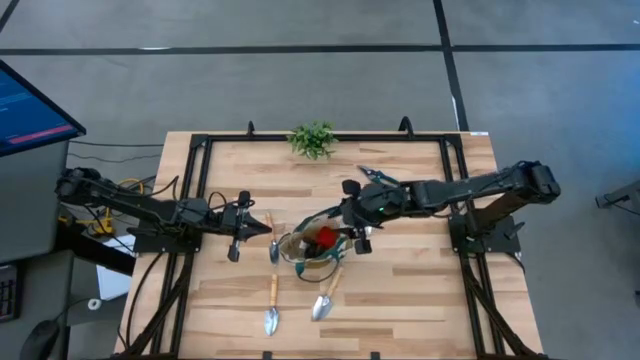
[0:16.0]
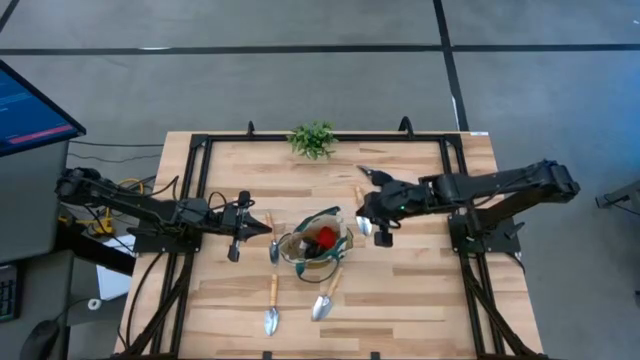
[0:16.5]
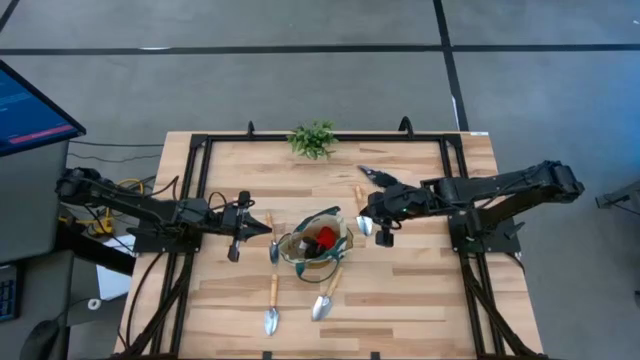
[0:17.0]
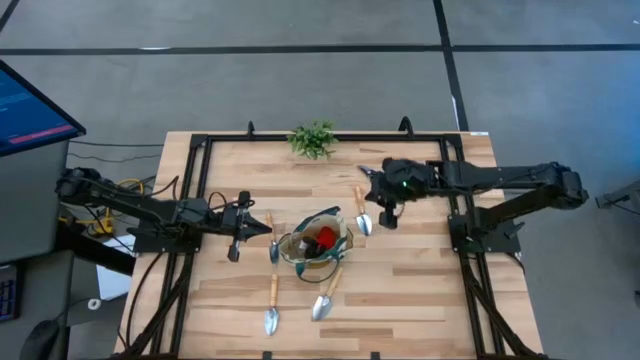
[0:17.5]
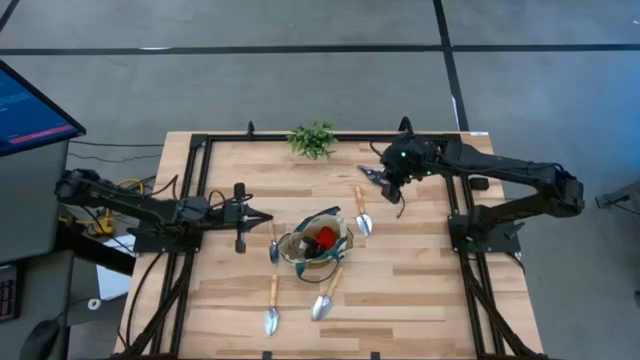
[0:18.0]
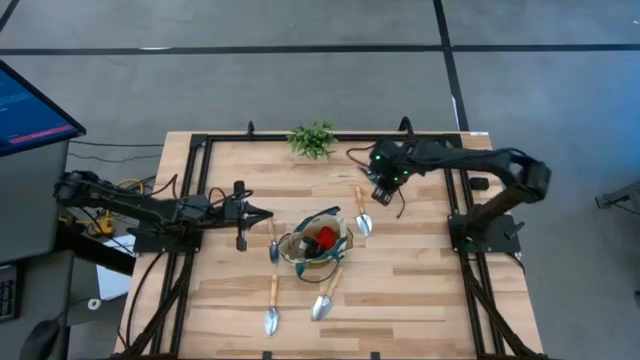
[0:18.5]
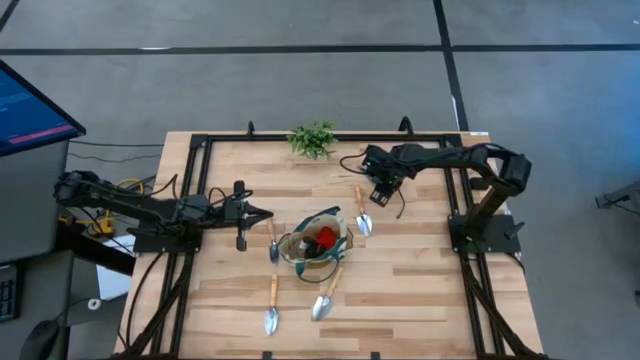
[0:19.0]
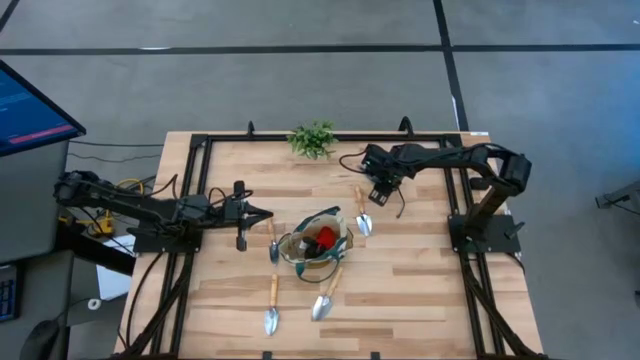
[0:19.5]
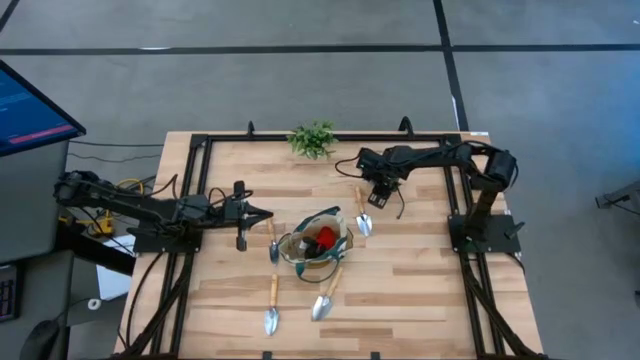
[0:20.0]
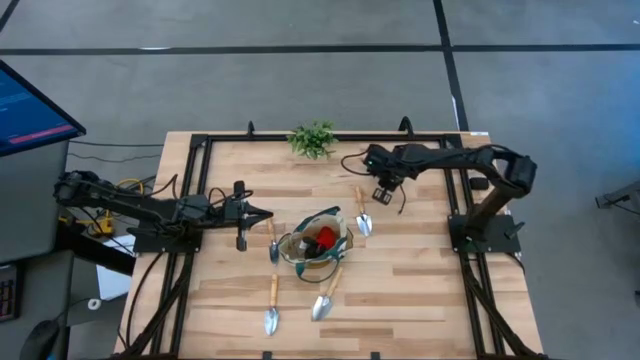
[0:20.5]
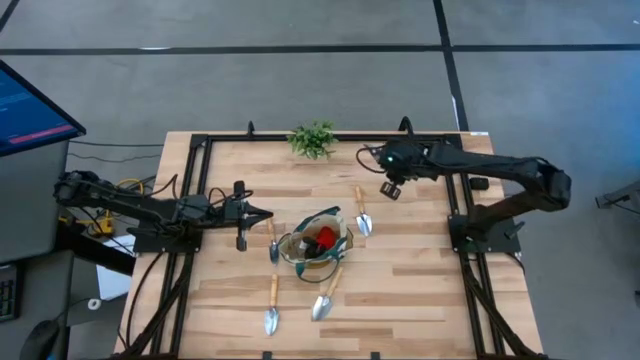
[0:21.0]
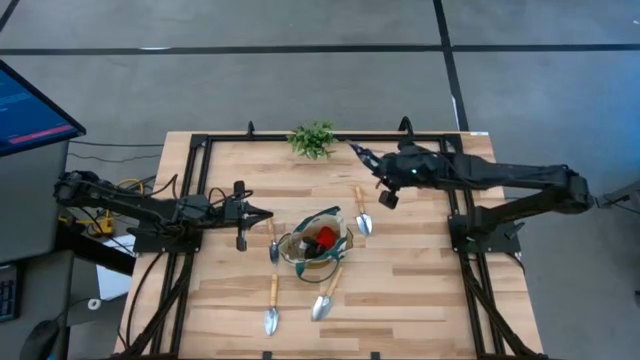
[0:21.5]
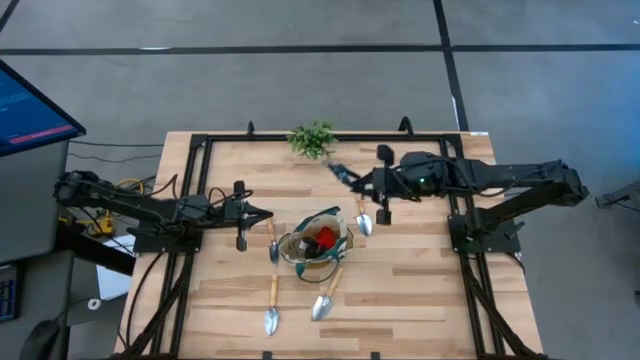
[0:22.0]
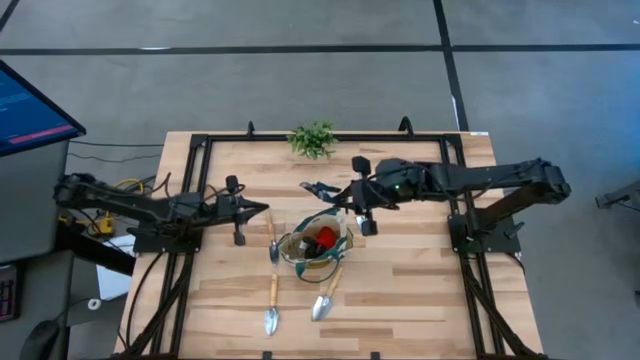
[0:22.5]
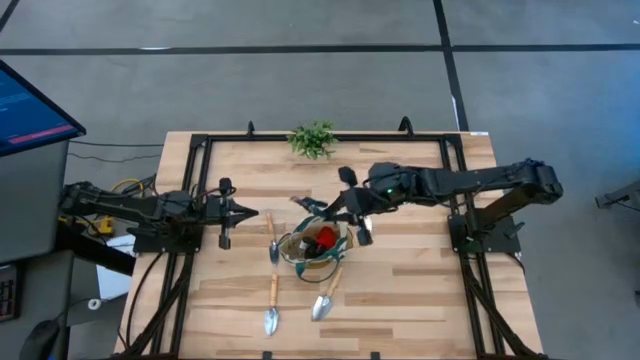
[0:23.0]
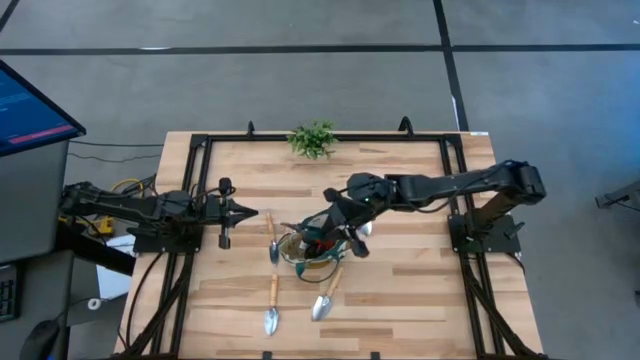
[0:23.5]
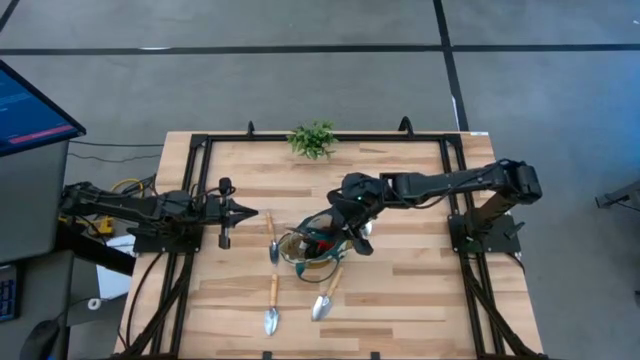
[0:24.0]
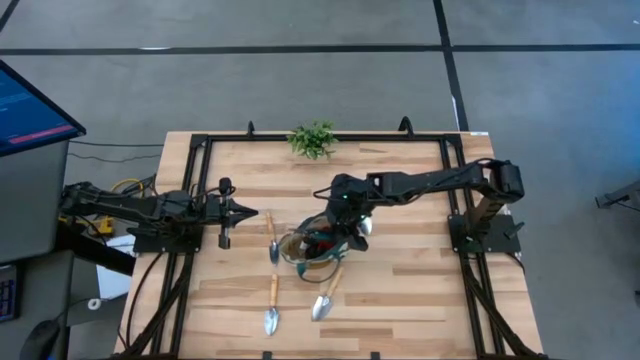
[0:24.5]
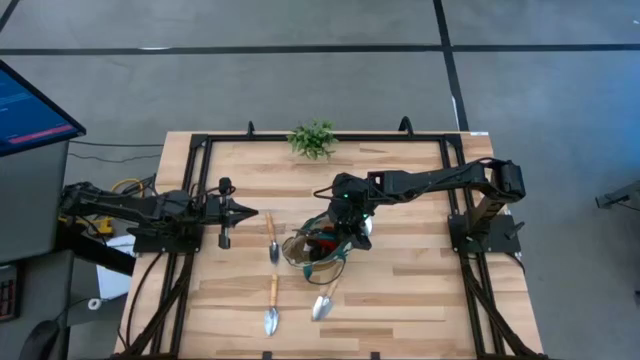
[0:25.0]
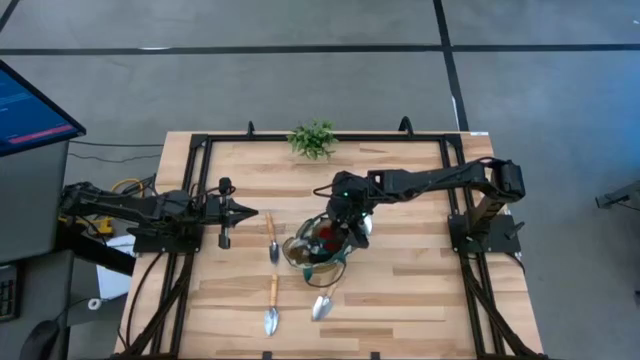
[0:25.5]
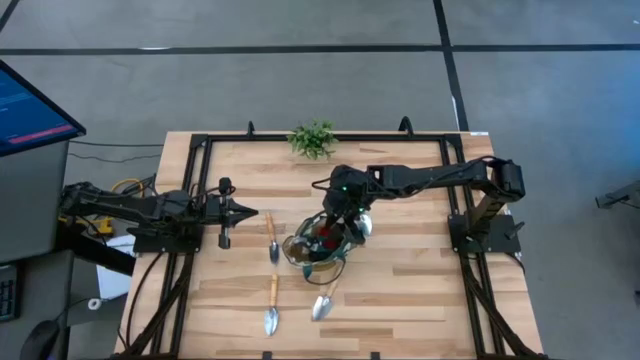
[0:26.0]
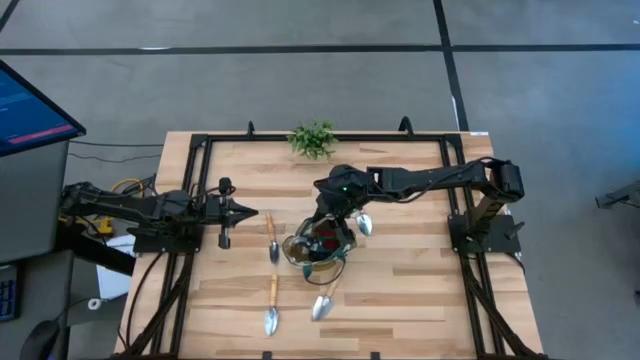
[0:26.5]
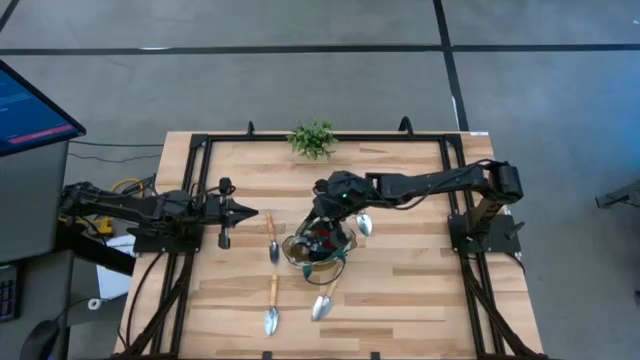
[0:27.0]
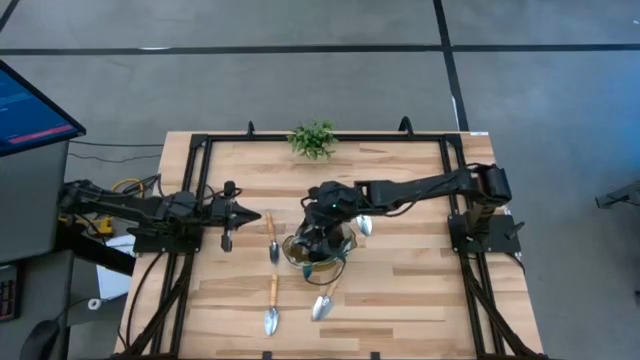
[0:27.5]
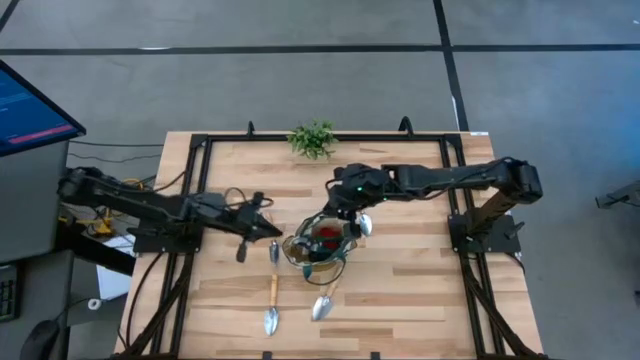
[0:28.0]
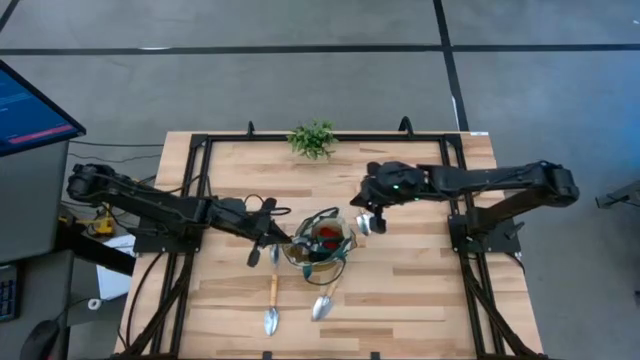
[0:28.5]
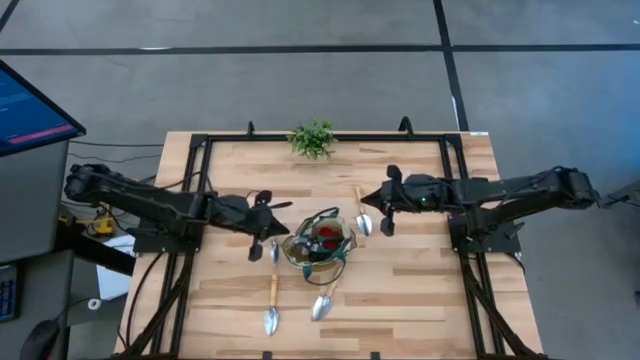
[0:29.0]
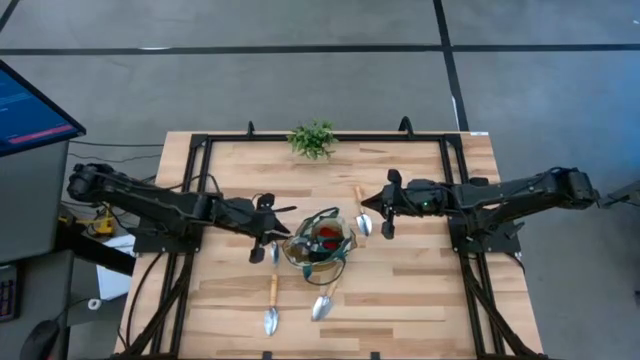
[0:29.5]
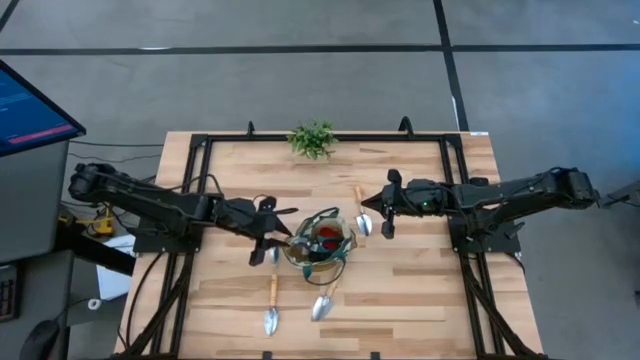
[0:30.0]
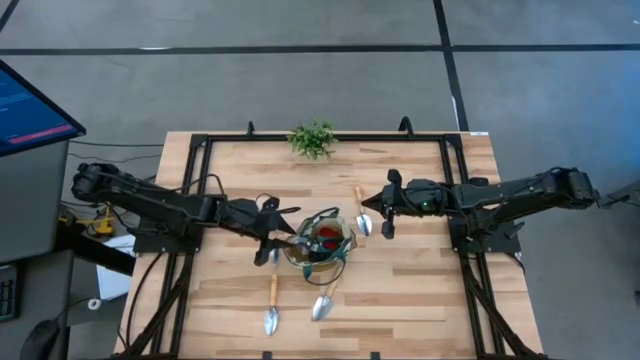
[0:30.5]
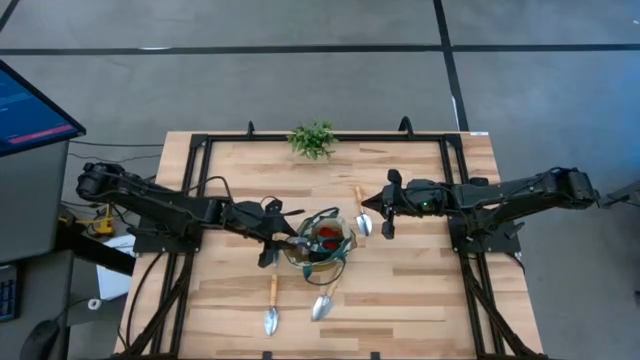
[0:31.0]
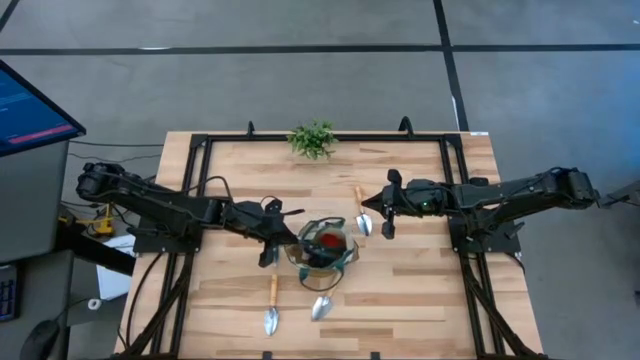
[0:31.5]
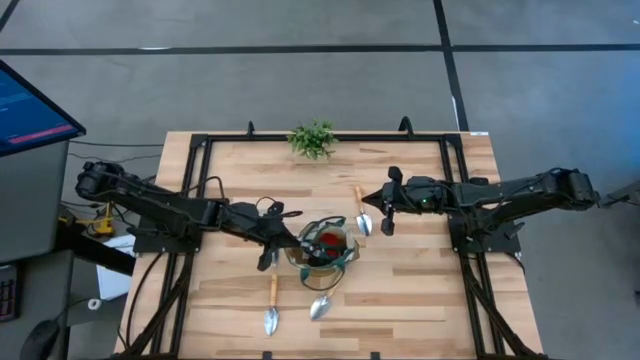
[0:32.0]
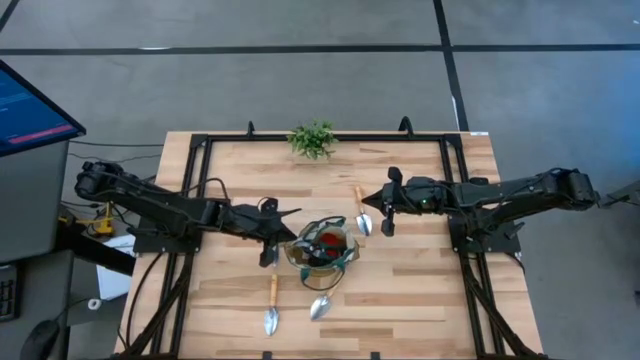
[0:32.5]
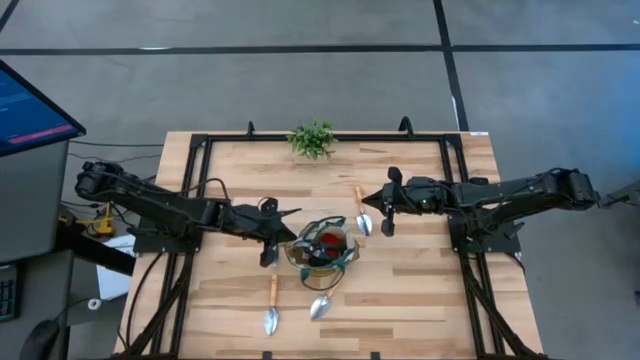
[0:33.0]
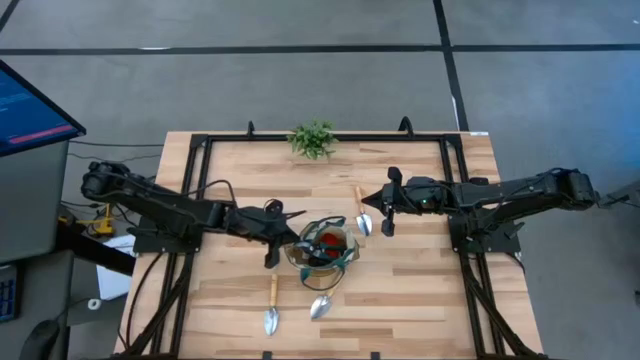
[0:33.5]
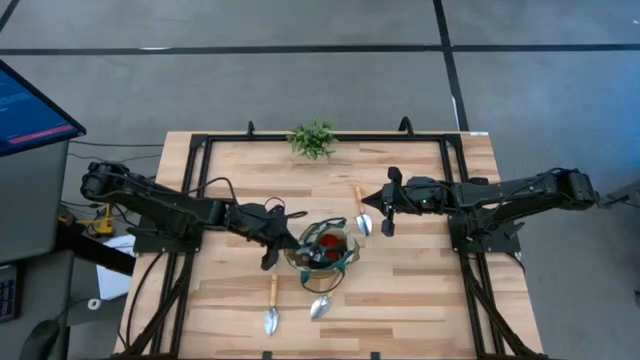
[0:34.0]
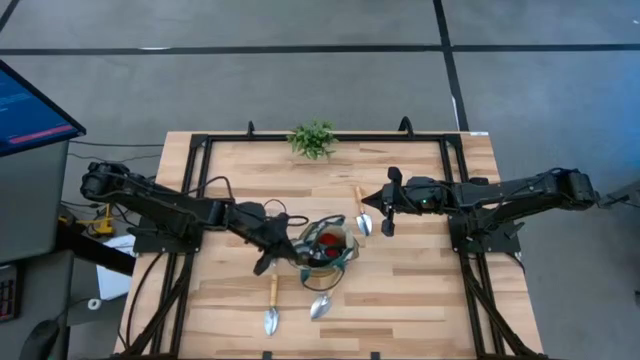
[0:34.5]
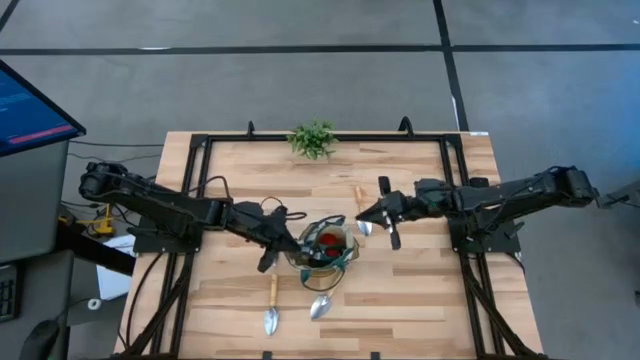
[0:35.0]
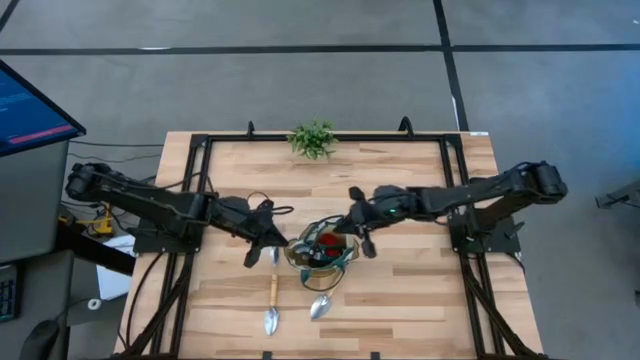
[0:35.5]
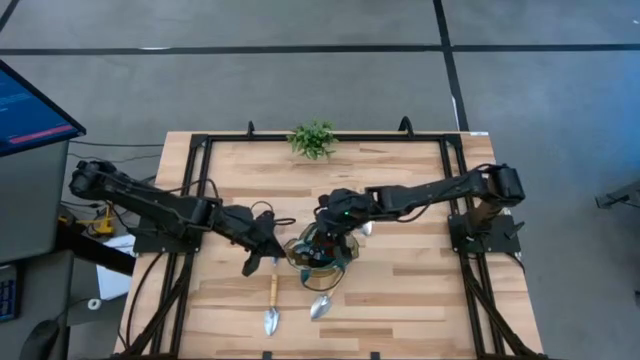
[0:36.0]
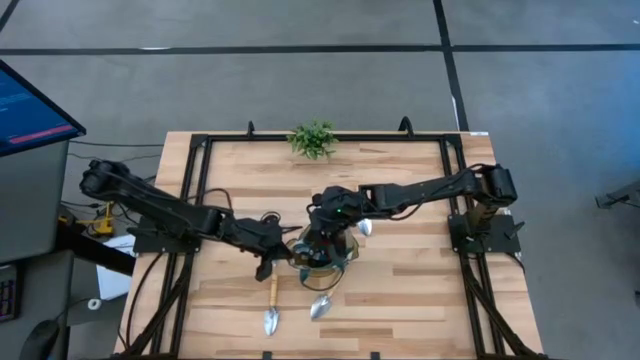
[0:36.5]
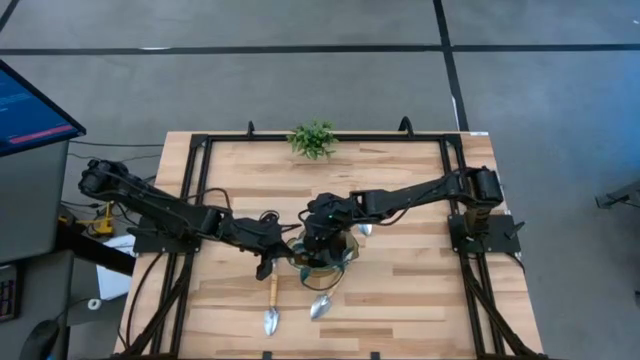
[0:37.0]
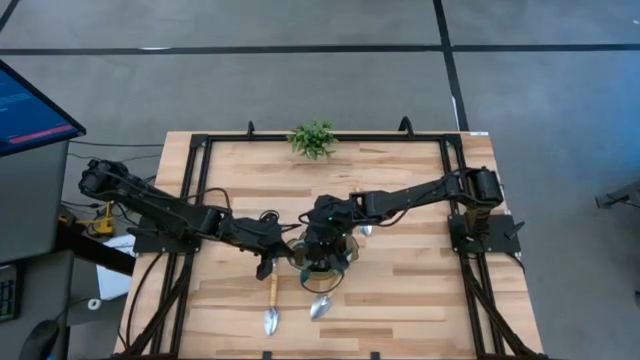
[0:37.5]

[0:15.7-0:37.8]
Task: Pick & Place Garden tools in Gardening bag
Put the shear scissors into the gardening bag
